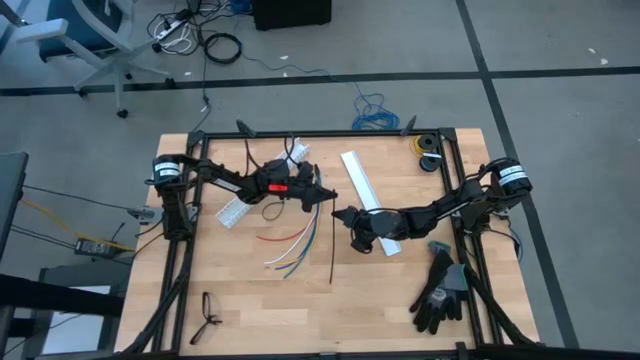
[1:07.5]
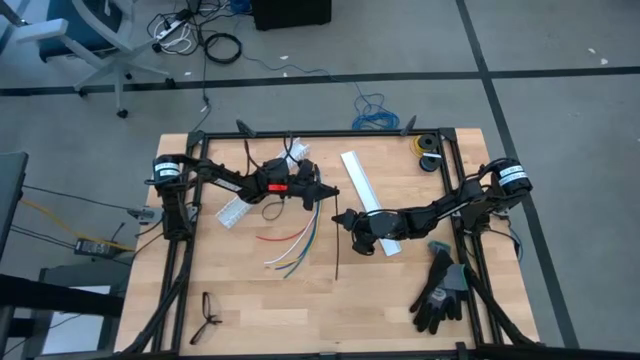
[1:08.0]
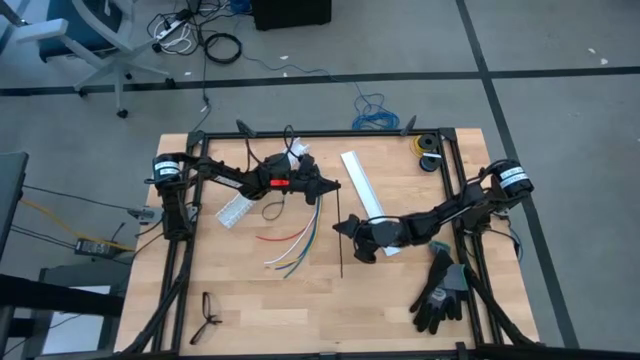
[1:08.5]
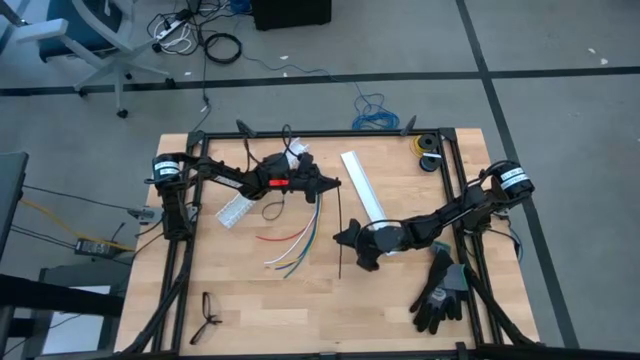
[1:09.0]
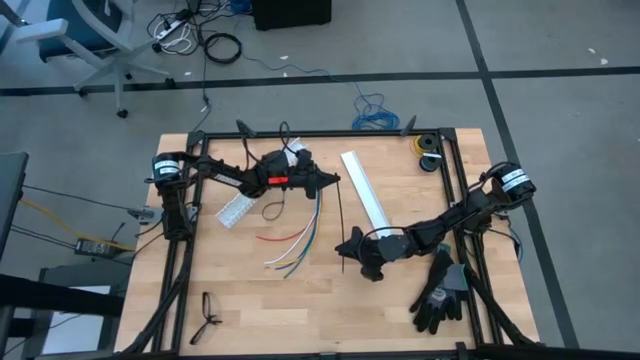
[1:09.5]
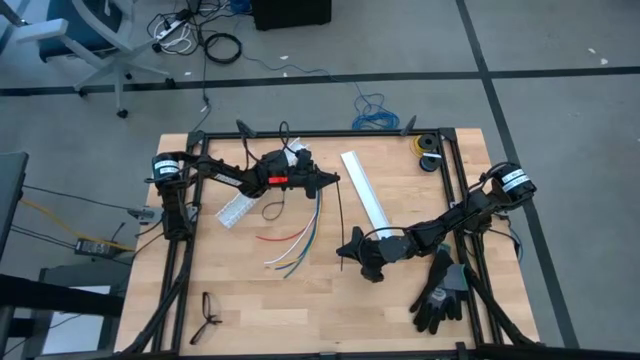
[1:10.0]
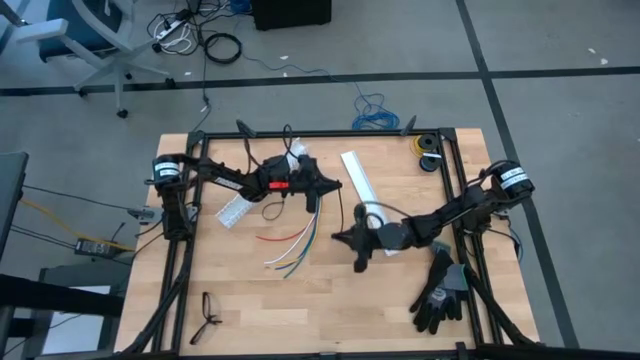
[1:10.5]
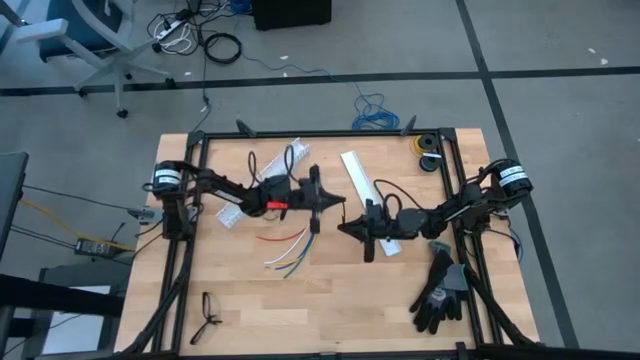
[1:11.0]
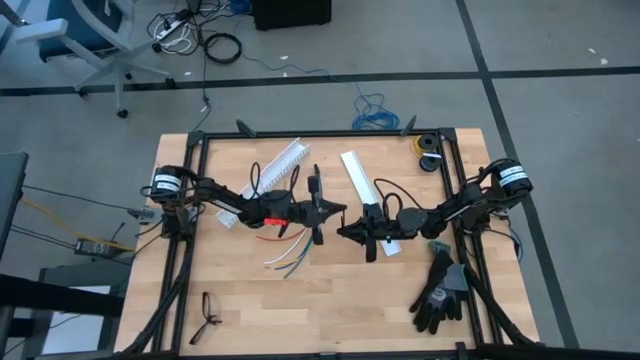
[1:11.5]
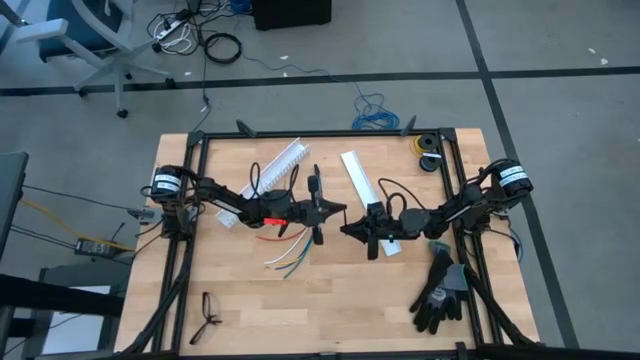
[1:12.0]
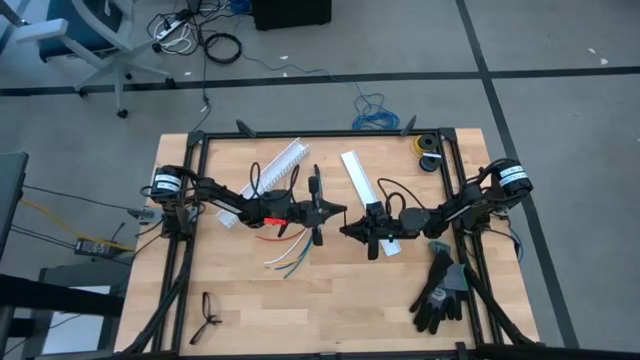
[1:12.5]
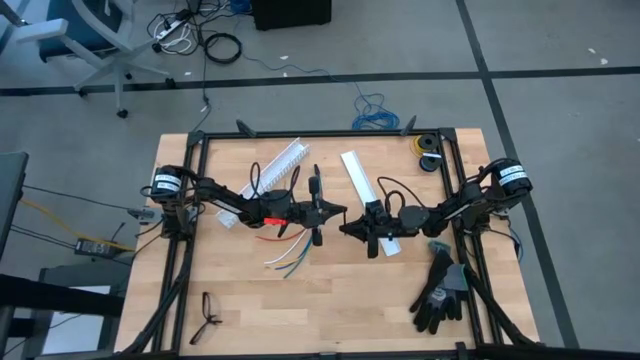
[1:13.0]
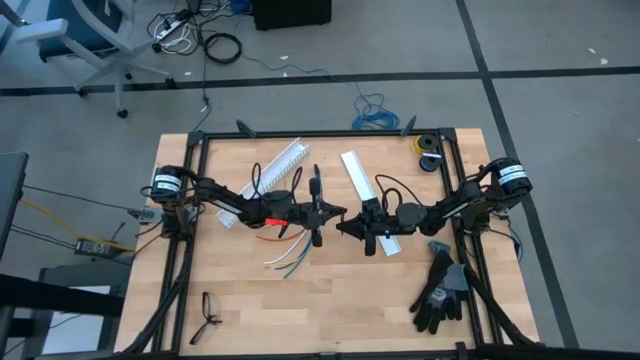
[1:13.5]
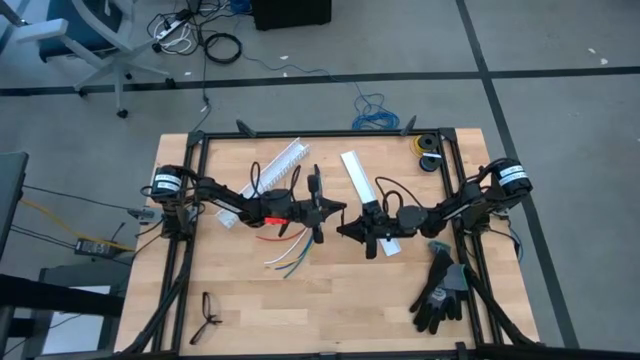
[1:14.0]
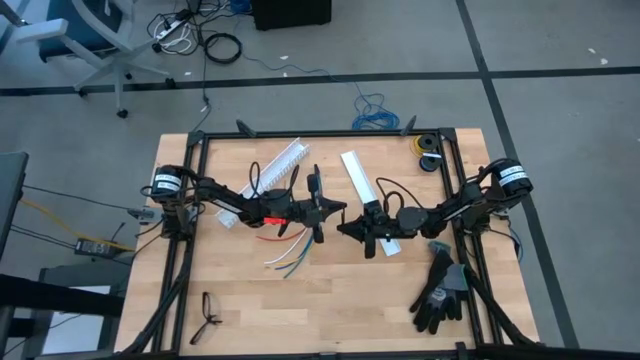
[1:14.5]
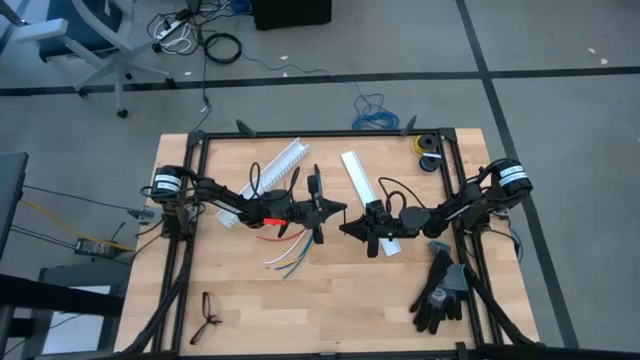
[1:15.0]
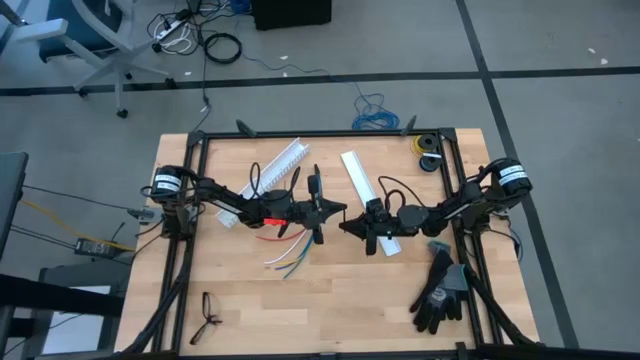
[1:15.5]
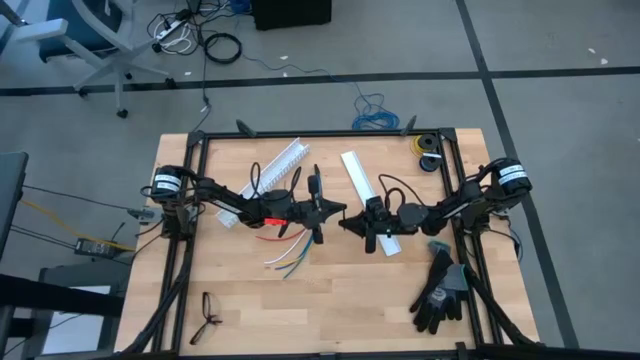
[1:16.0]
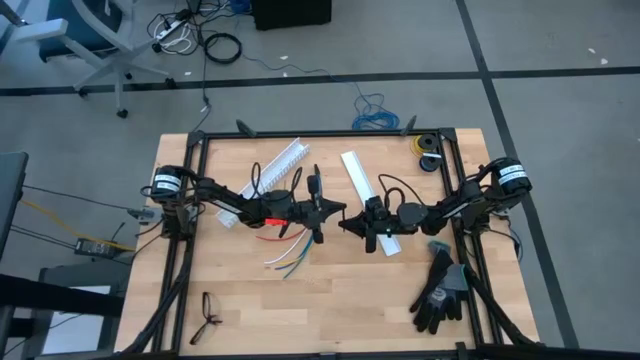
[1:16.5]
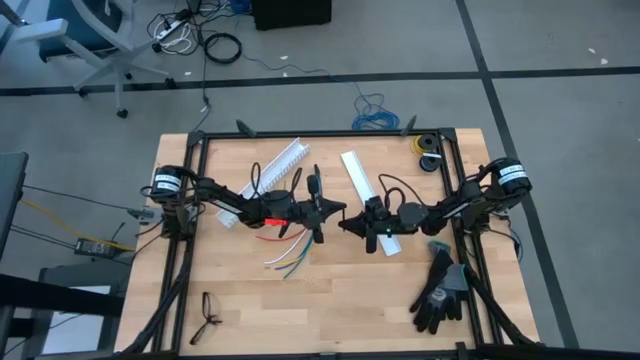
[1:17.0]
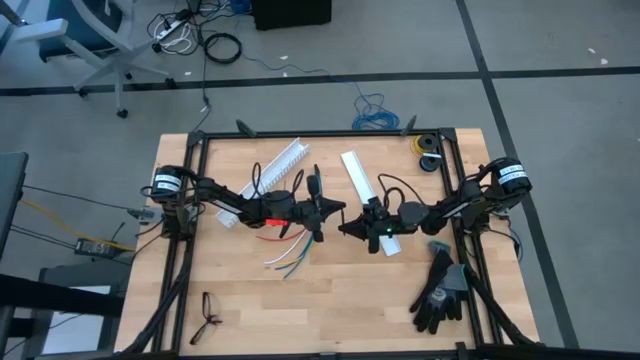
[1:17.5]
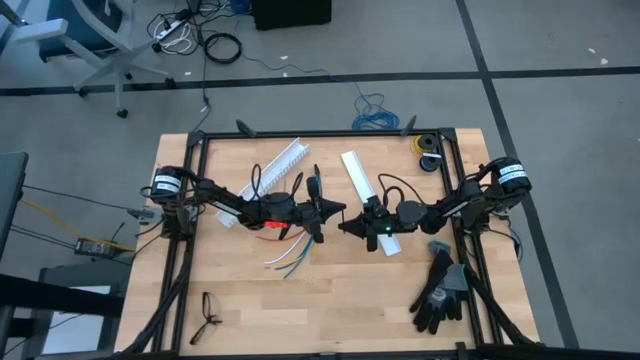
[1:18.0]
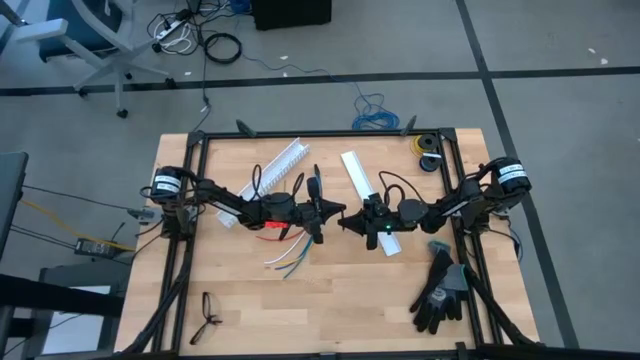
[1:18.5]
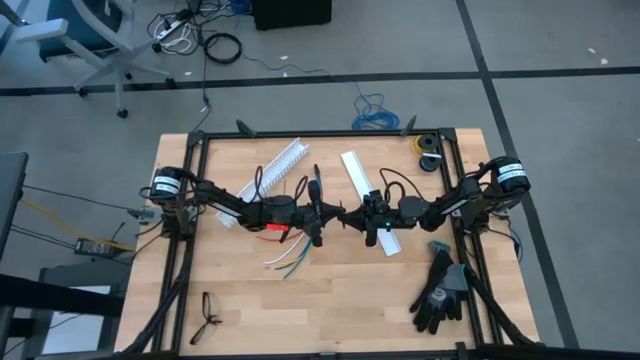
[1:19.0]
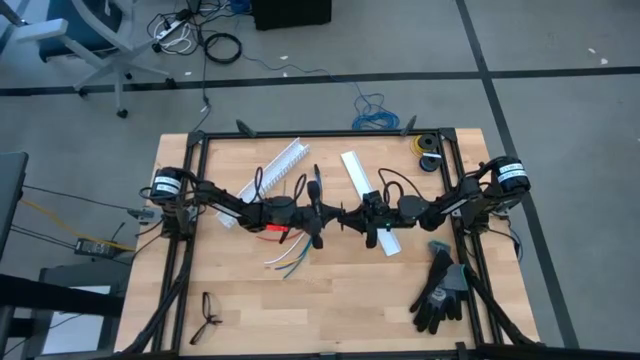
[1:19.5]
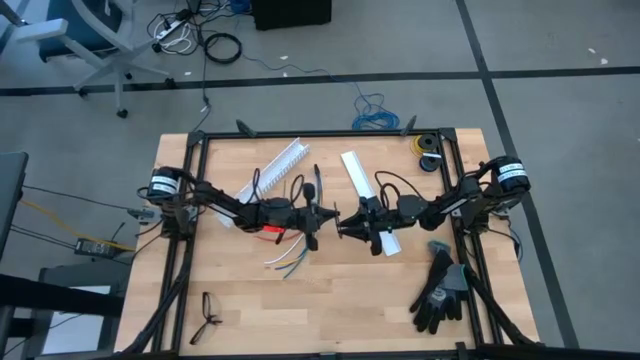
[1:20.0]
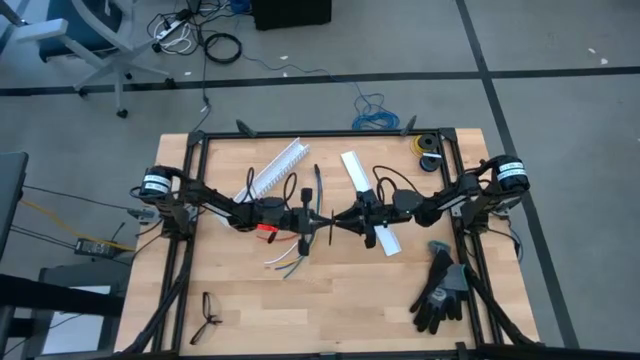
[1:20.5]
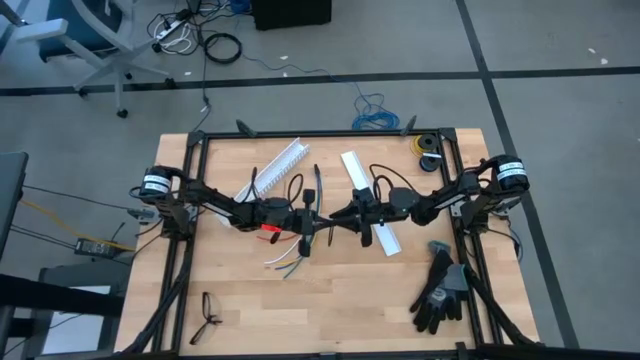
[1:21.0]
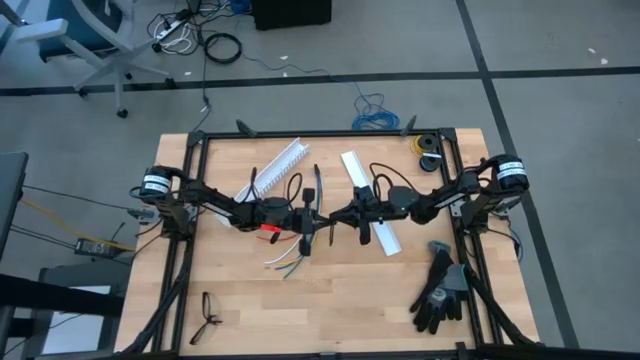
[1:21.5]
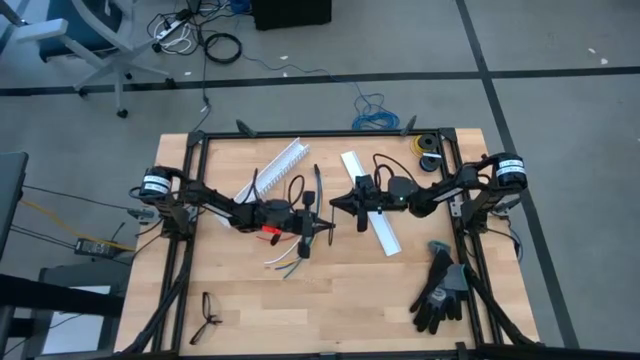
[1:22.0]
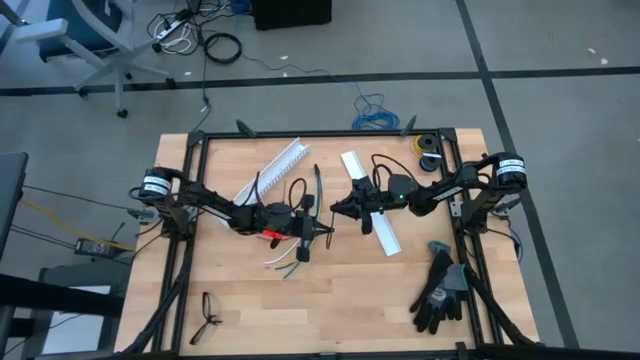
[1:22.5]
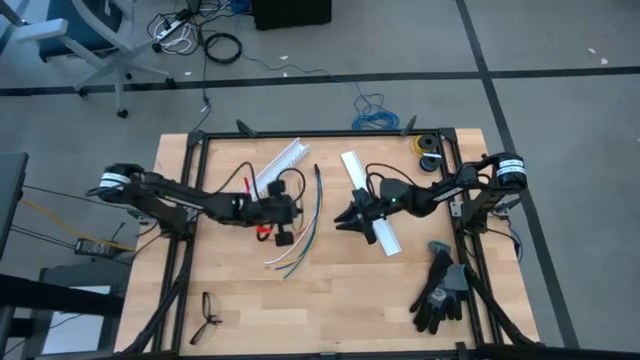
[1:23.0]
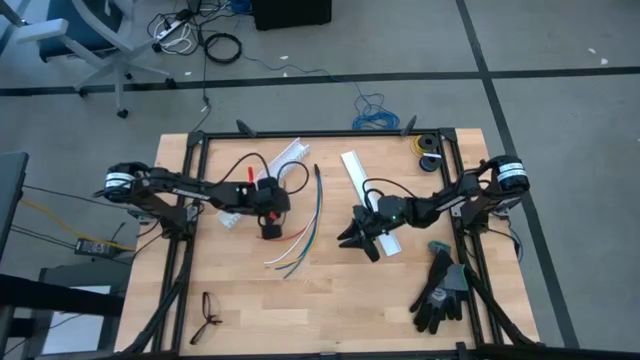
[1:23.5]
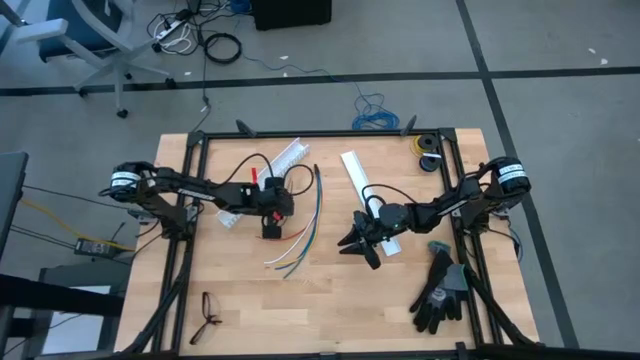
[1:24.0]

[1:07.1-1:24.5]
Task: Ziptie cables
Prepare the black zip tie to wrap the cable wires
